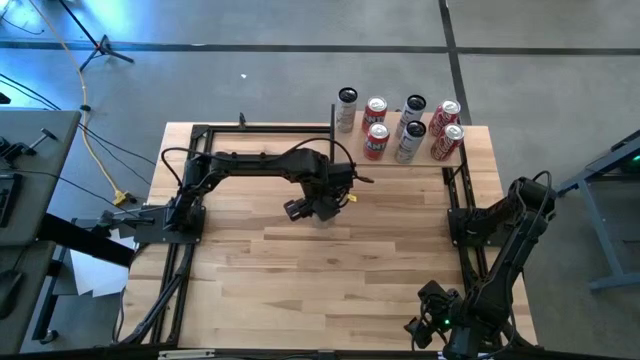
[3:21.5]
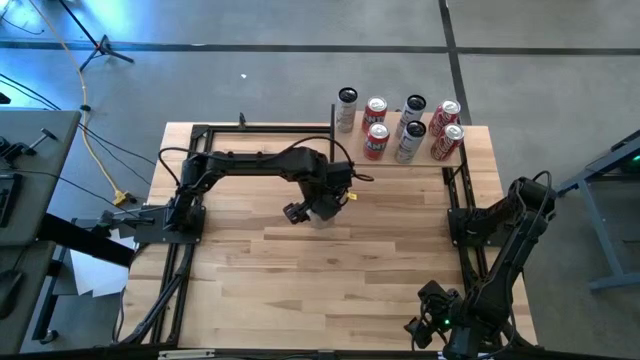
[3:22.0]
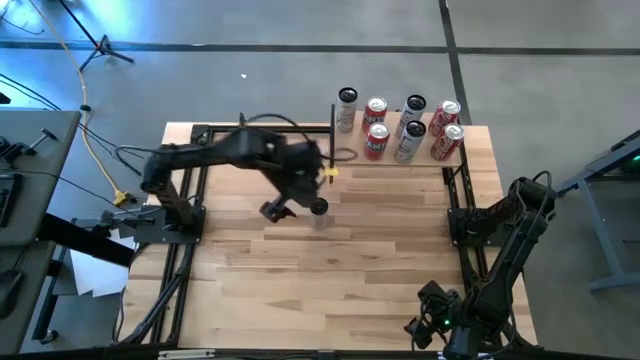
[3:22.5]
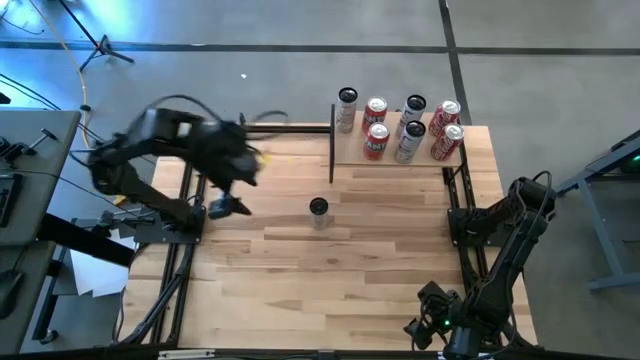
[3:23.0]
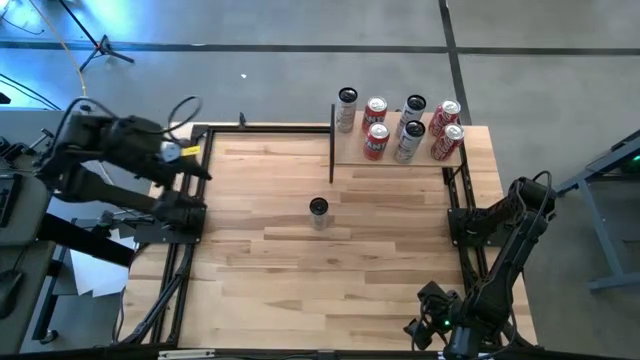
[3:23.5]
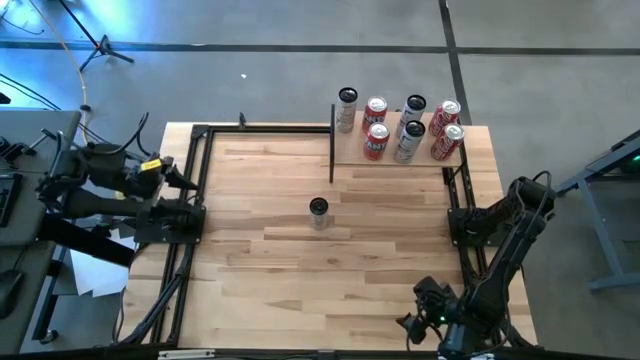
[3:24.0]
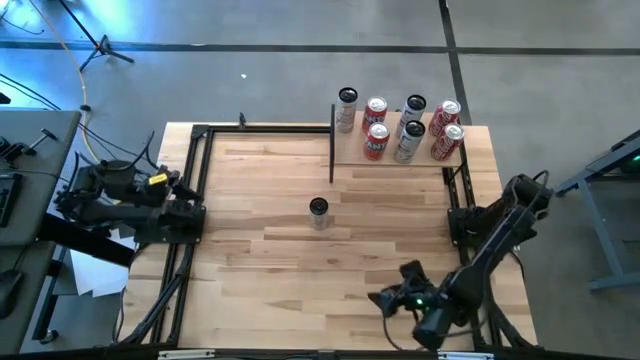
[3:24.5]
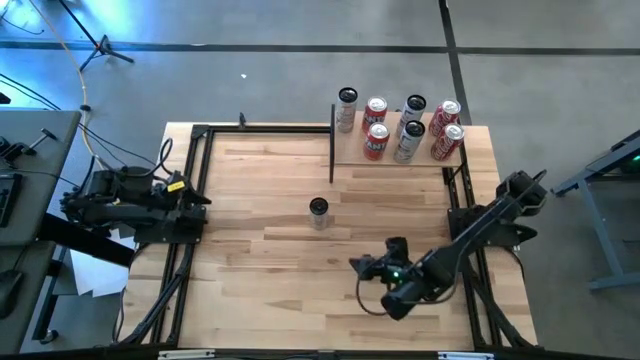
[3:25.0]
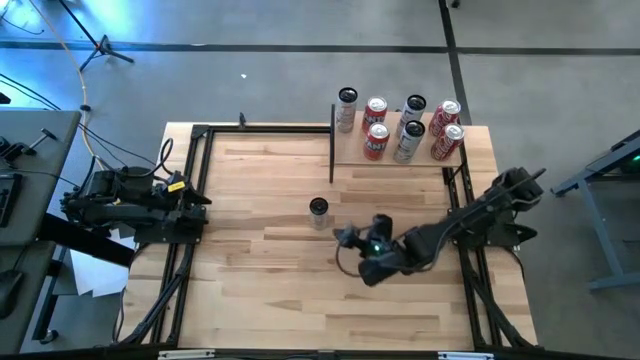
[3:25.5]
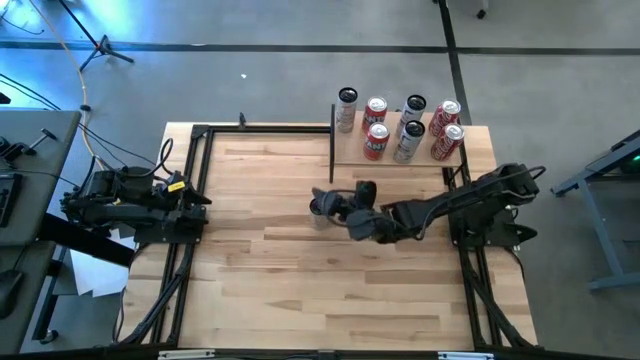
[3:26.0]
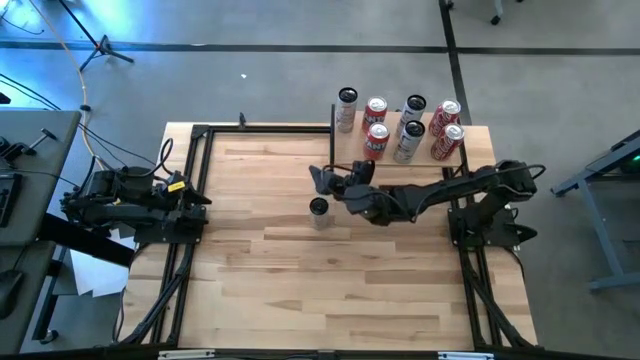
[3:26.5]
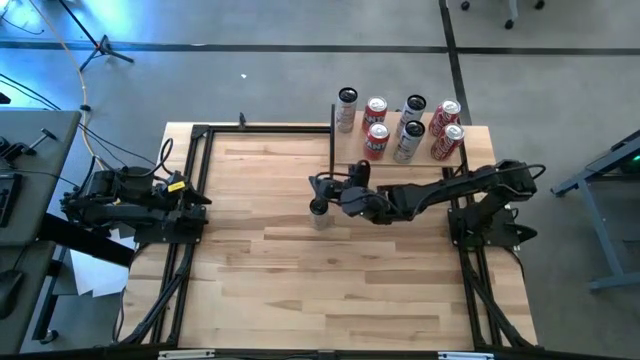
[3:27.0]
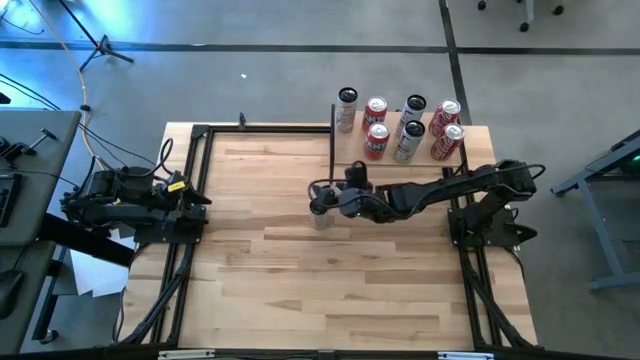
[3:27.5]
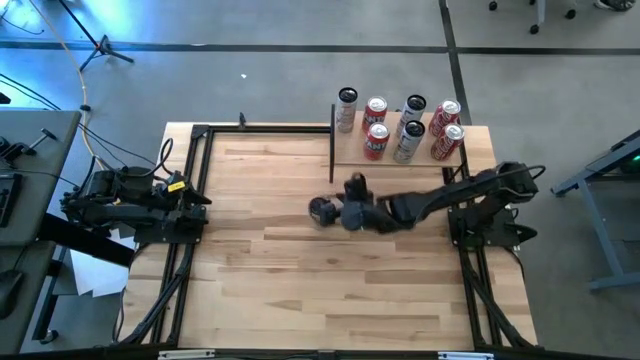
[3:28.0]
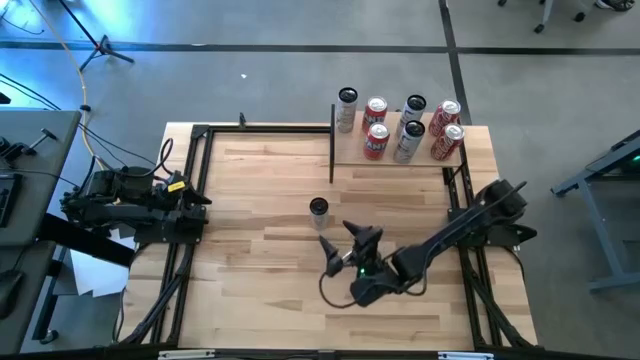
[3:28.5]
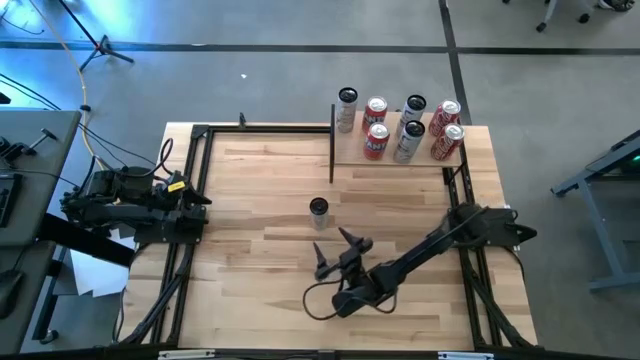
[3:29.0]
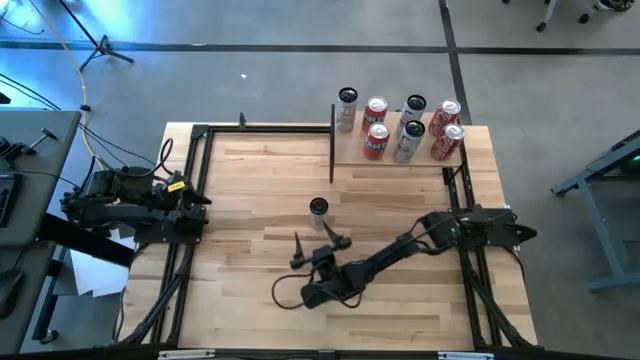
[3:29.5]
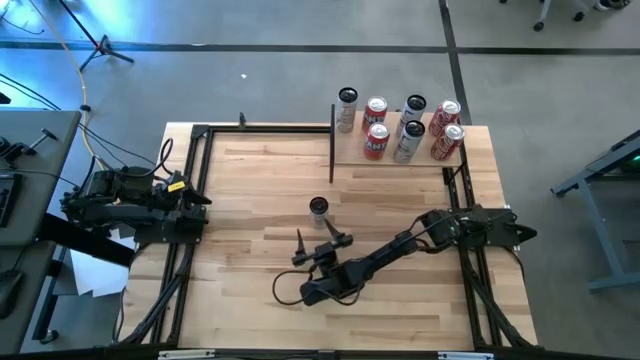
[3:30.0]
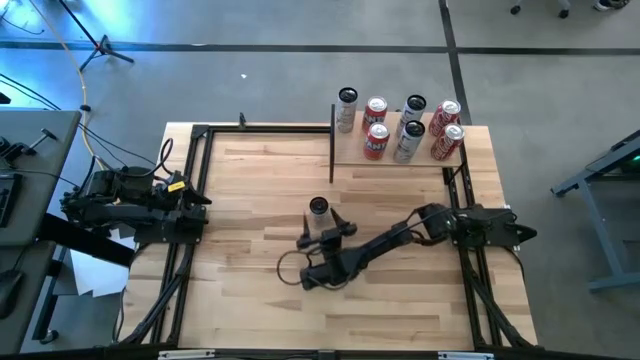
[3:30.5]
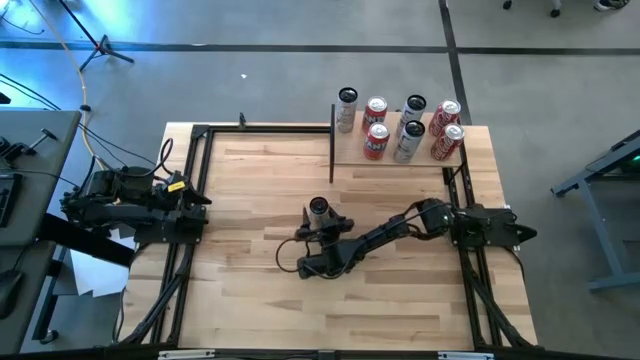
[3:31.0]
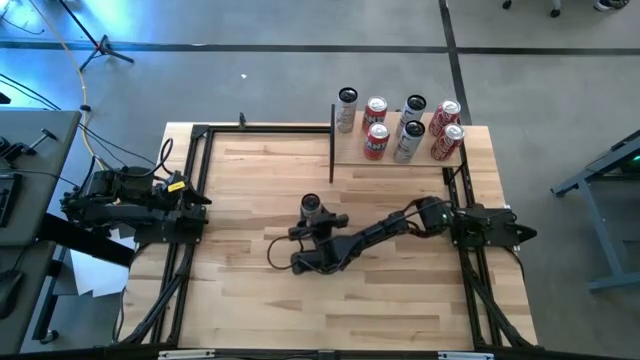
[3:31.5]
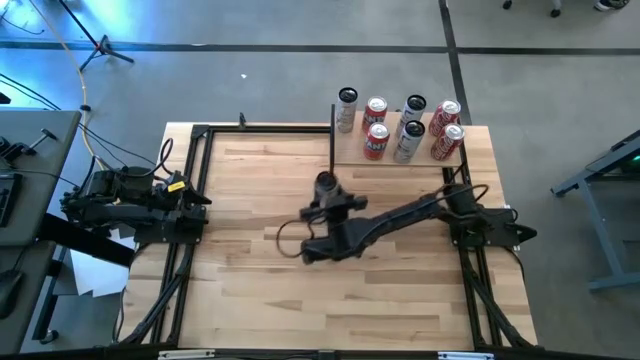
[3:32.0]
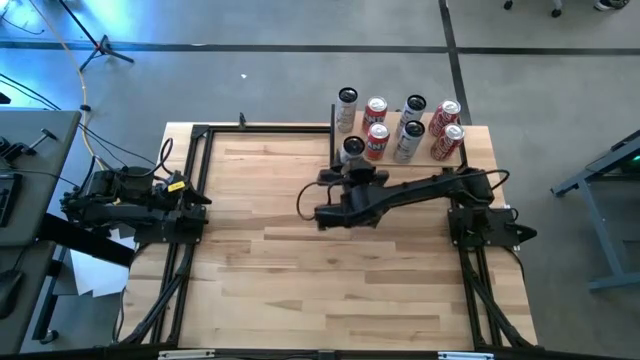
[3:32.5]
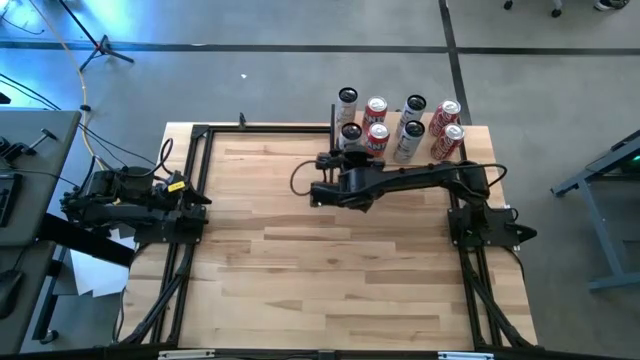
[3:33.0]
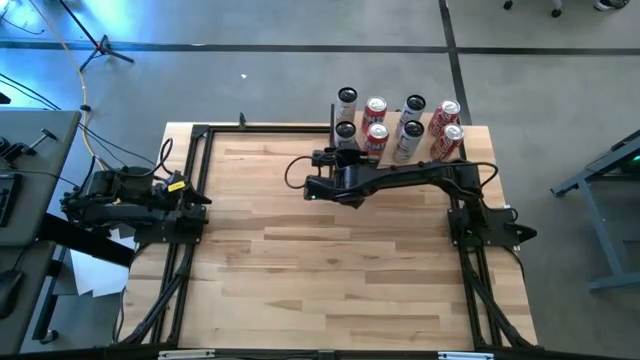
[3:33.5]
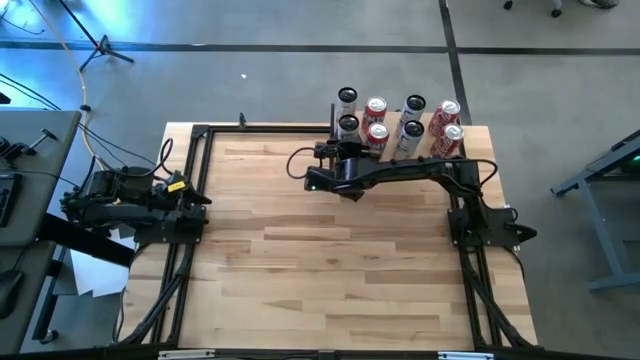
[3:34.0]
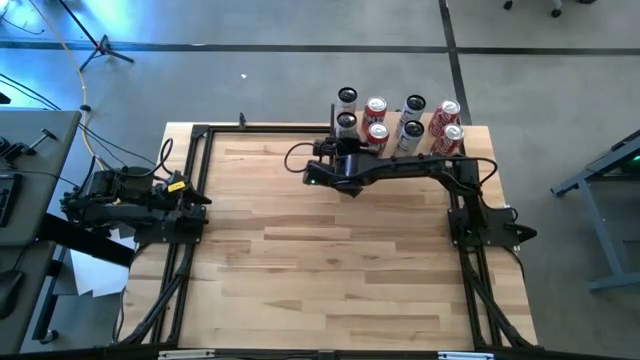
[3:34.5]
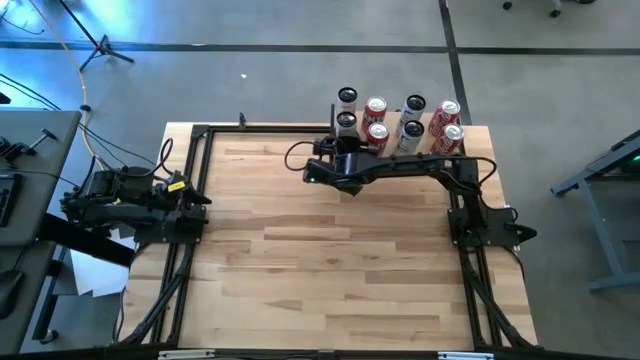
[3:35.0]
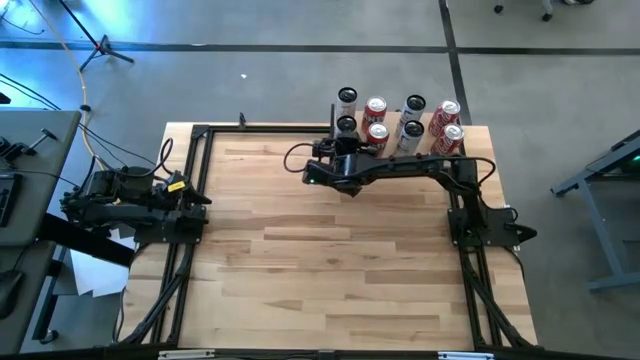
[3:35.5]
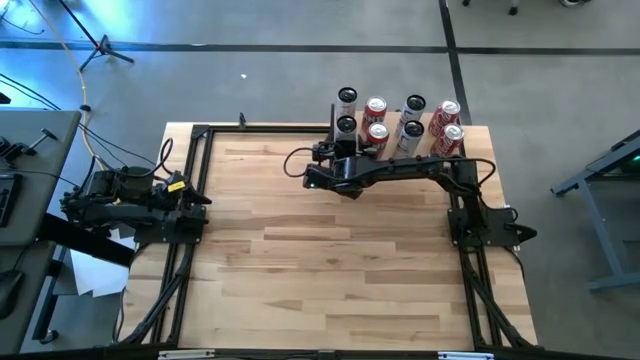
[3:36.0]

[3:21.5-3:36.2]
Task: Place canned beverage on shelf
Put the white yellow soda can on the shelf aligned with the other white yellow soda can

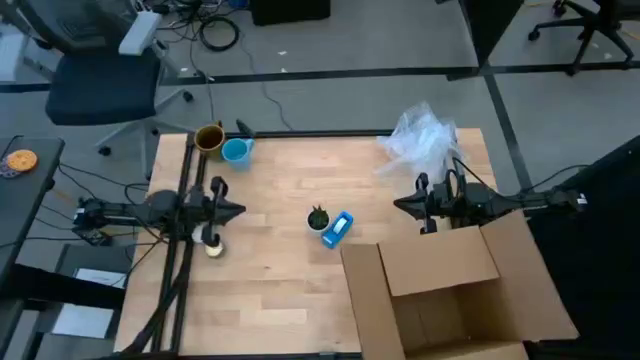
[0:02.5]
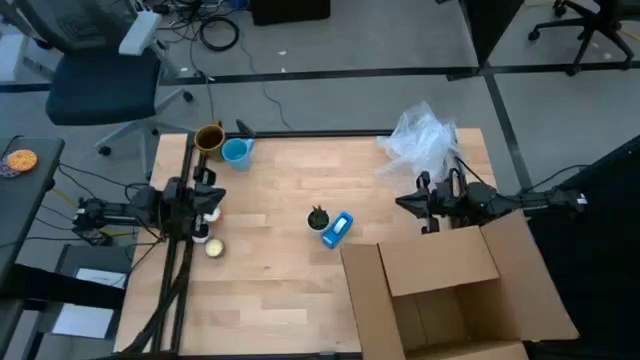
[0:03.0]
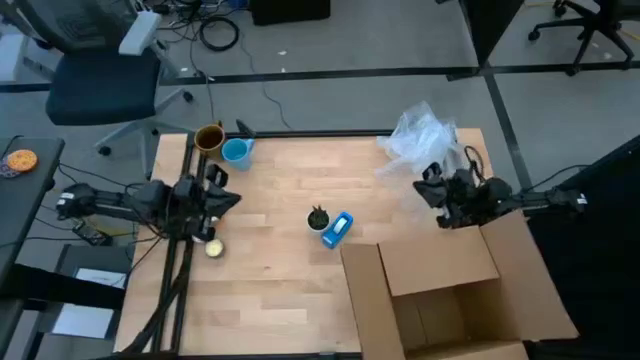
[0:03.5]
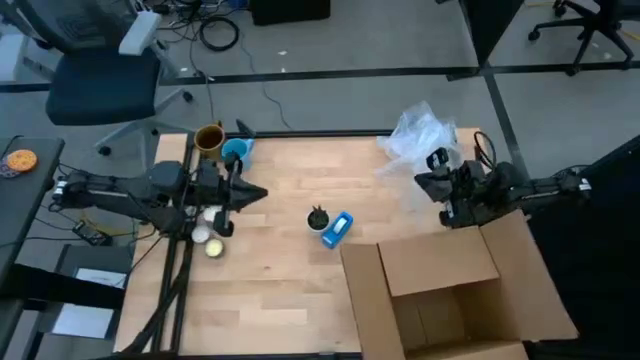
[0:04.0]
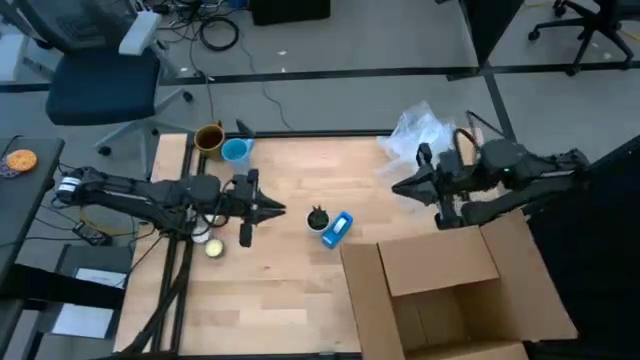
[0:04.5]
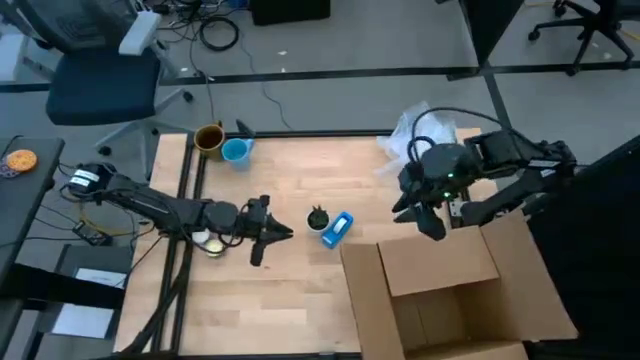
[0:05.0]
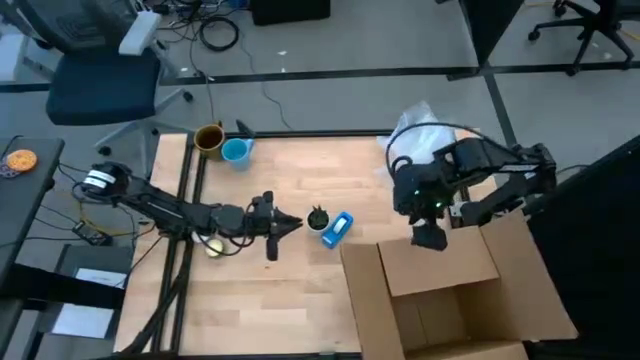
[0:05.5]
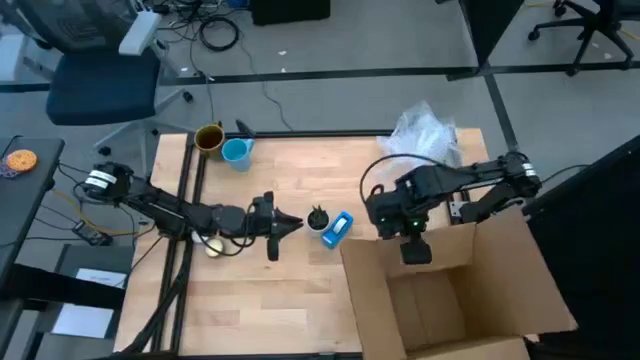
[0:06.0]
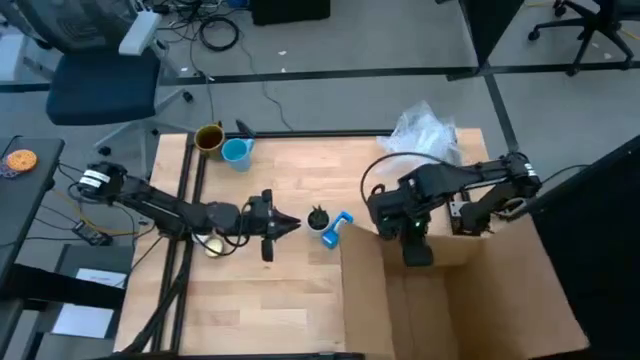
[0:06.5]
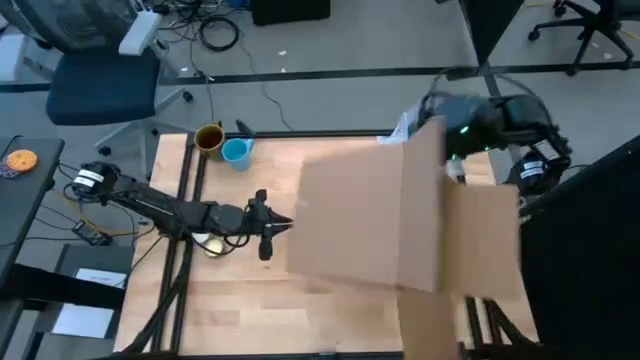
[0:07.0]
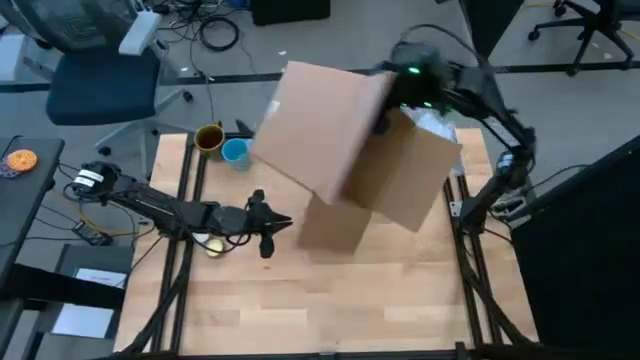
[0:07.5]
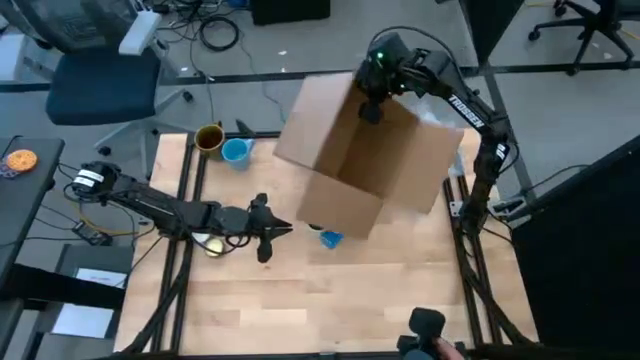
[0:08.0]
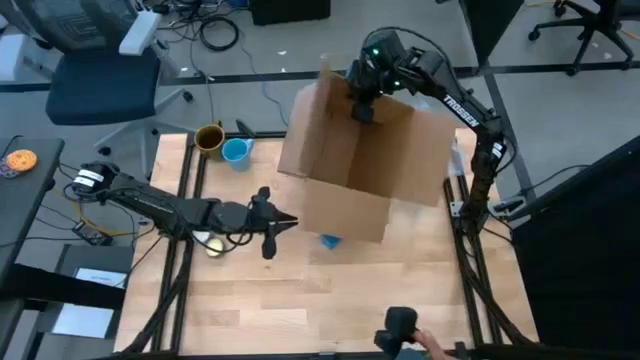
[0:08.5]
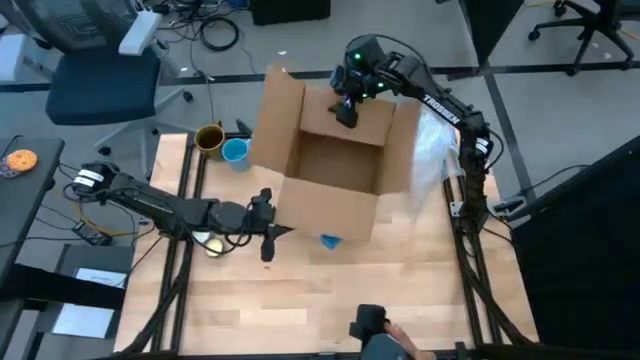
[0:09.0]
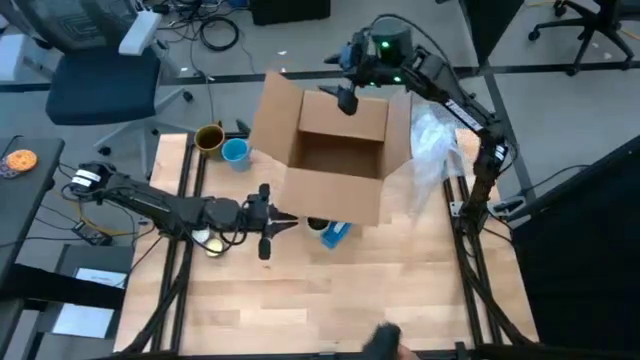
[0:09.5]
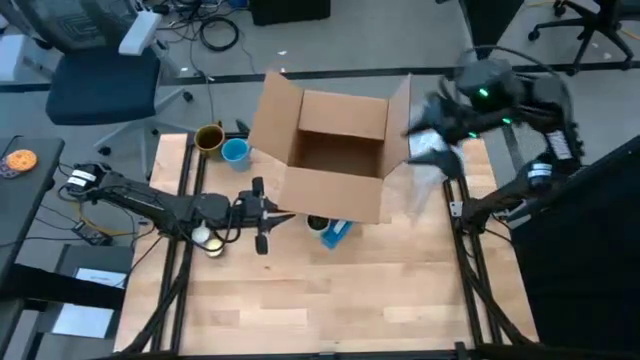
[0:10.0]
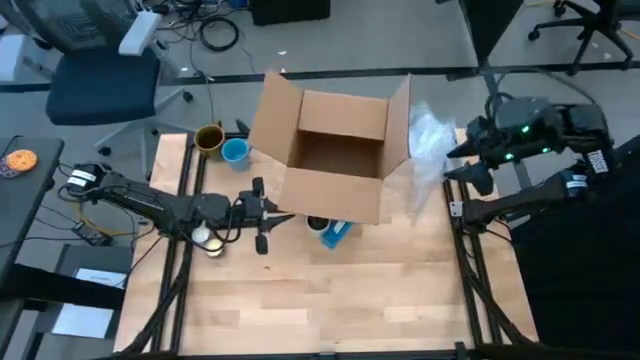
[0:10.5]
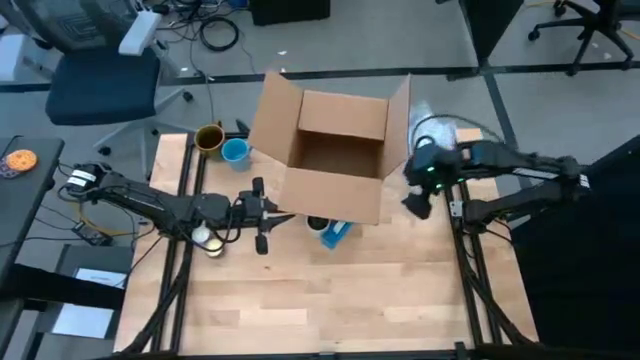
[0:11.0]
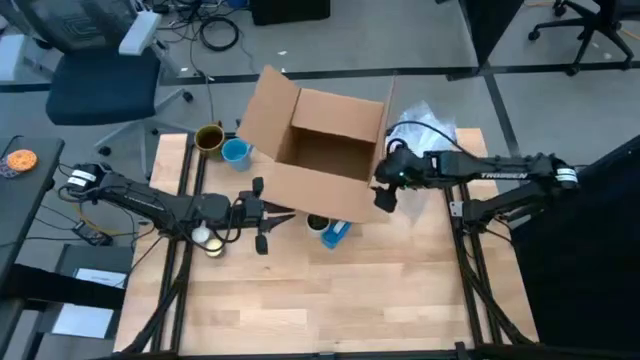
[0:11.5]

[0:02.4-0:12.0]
Task: wrap mug
Move the cardboard box to the top center of the table
